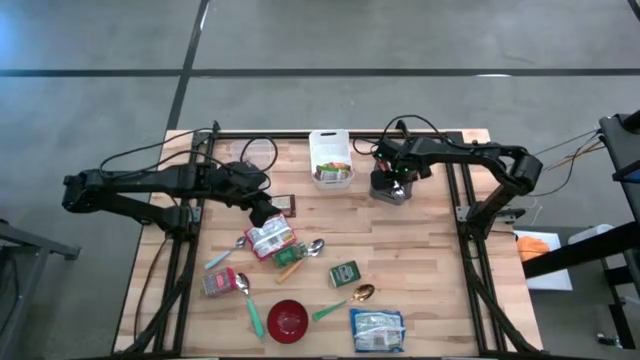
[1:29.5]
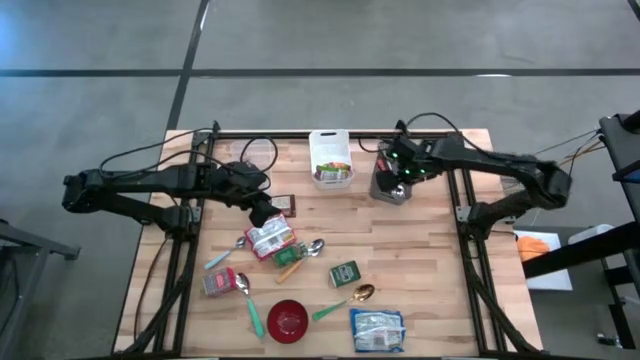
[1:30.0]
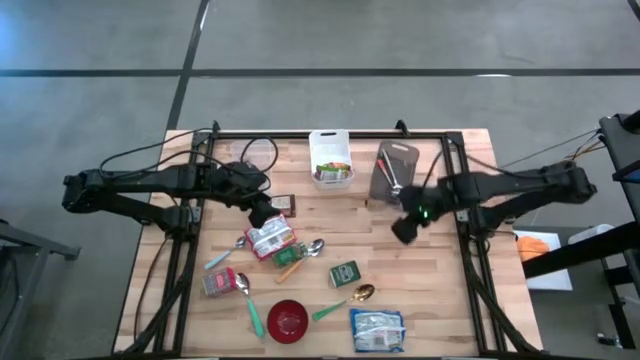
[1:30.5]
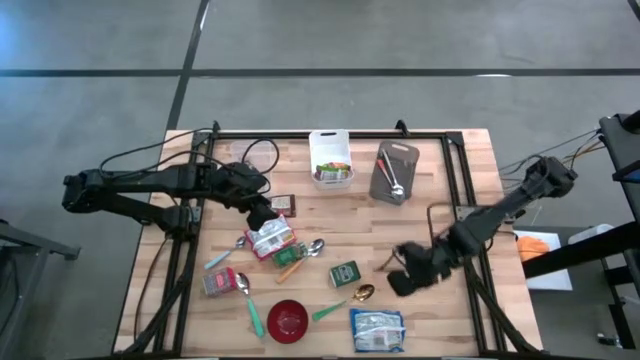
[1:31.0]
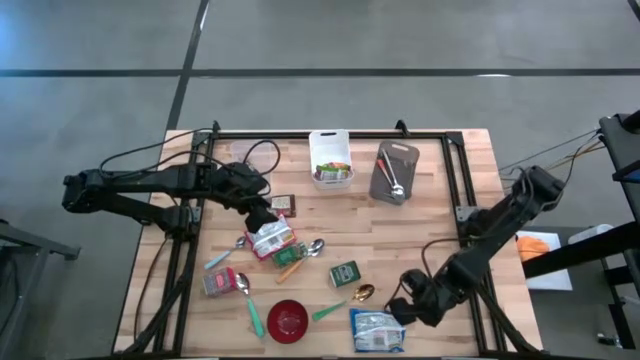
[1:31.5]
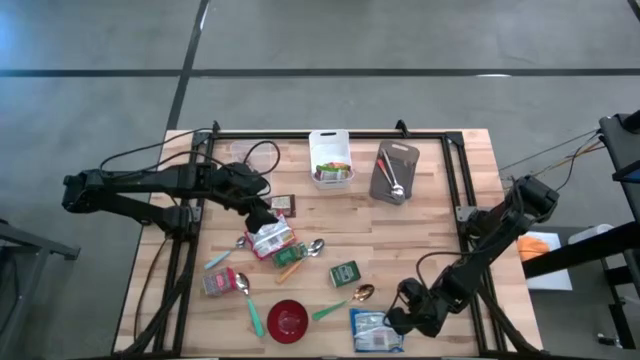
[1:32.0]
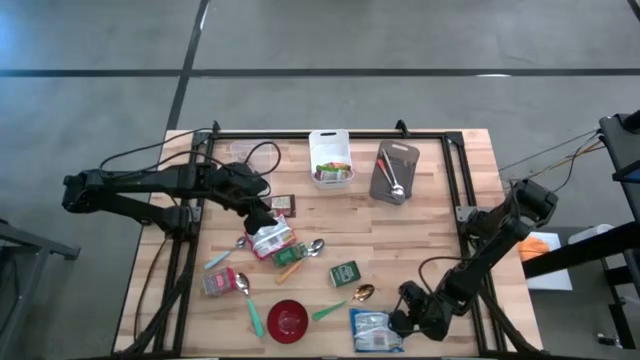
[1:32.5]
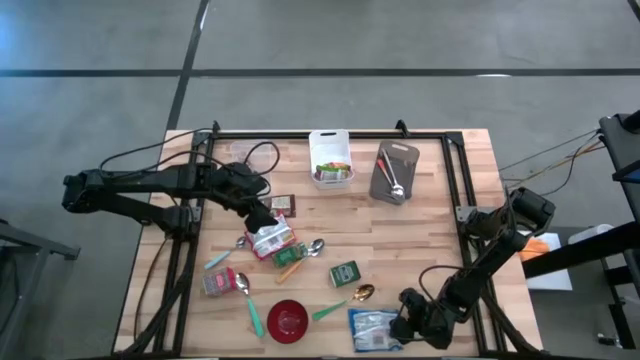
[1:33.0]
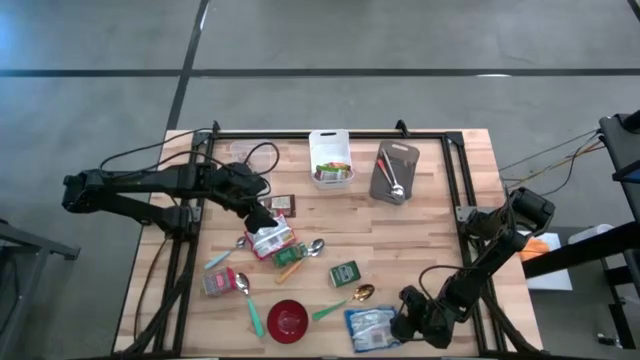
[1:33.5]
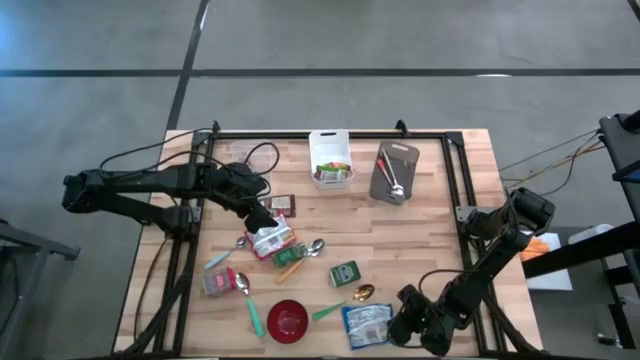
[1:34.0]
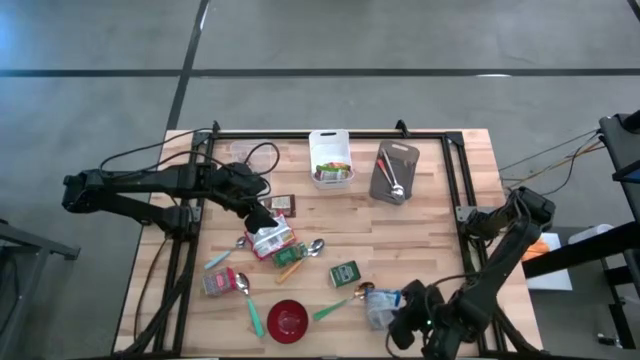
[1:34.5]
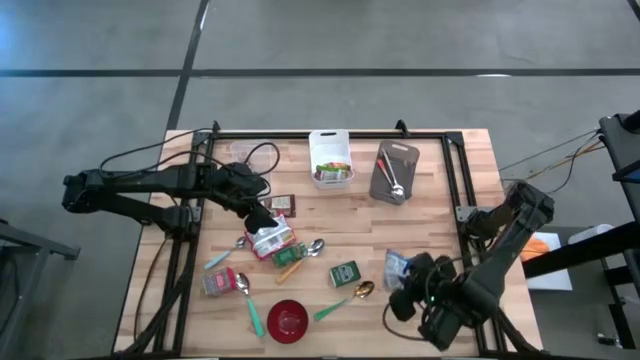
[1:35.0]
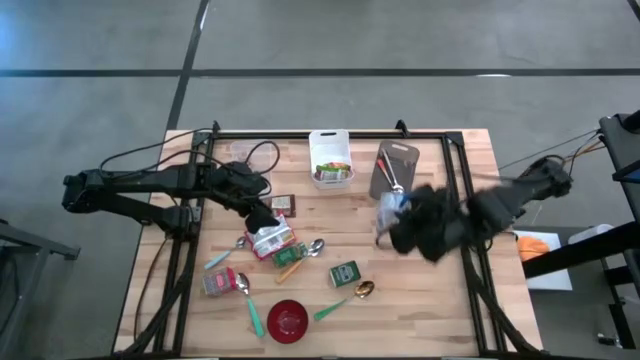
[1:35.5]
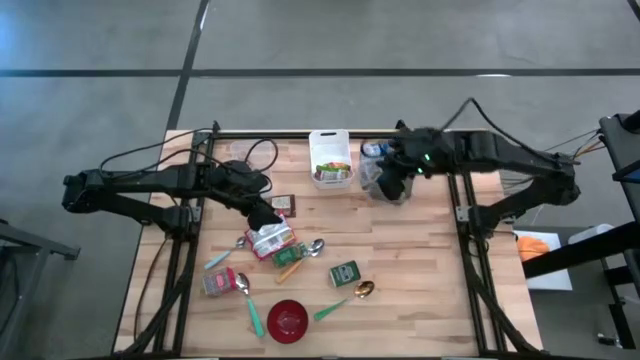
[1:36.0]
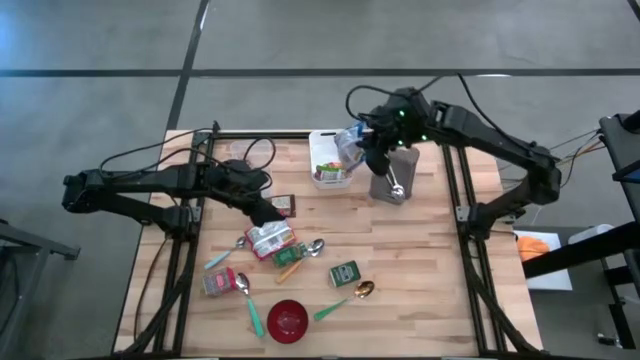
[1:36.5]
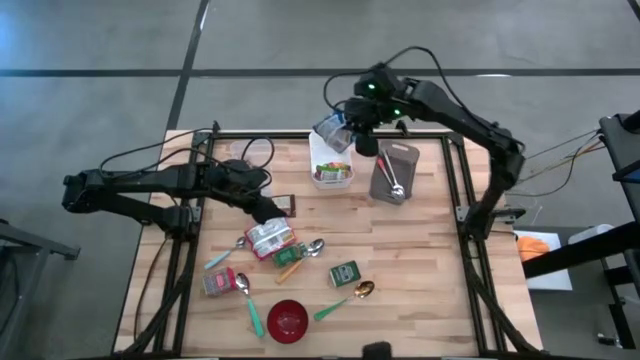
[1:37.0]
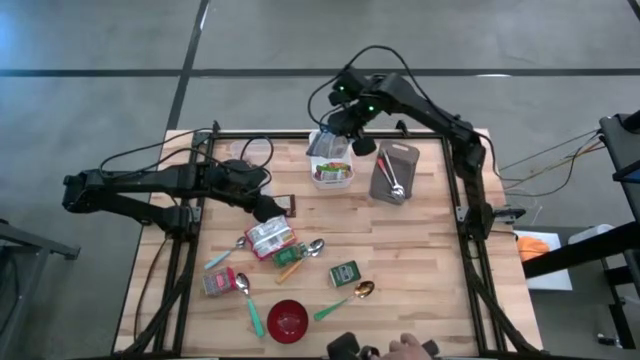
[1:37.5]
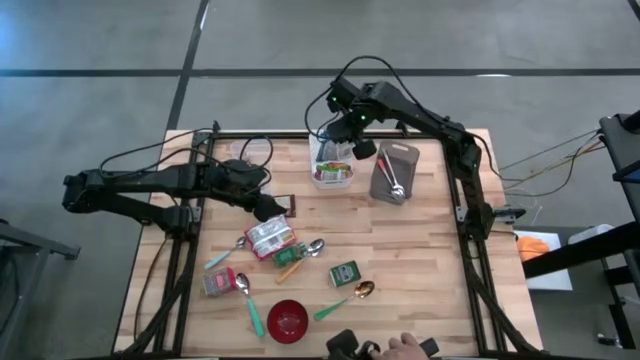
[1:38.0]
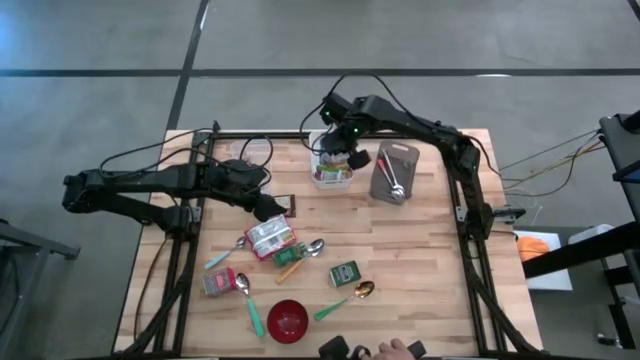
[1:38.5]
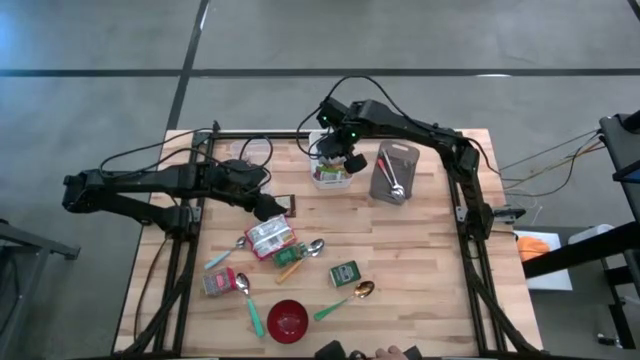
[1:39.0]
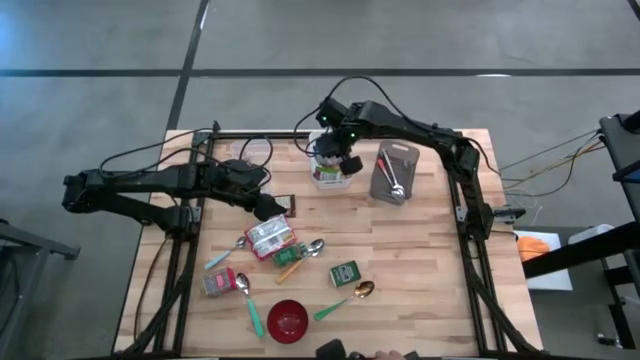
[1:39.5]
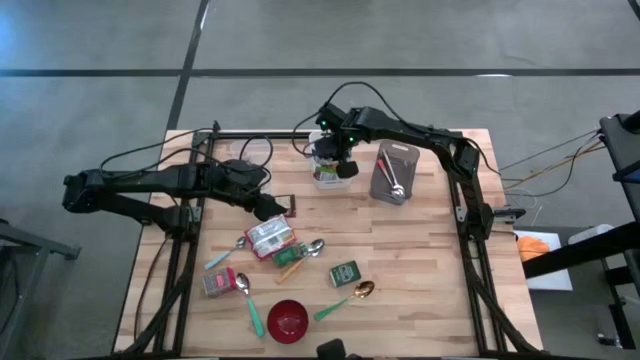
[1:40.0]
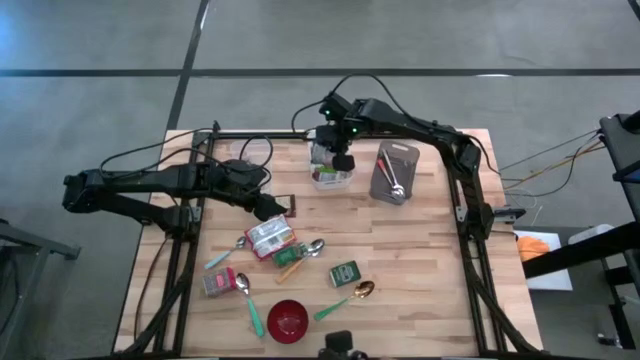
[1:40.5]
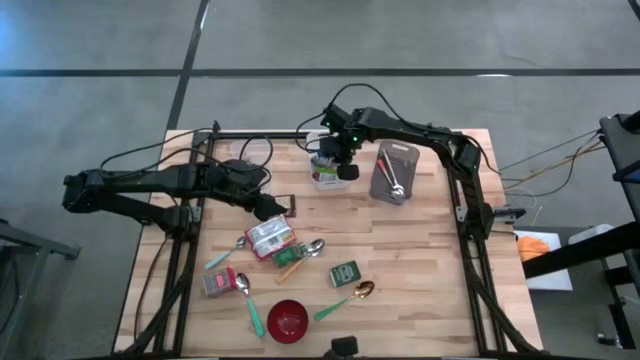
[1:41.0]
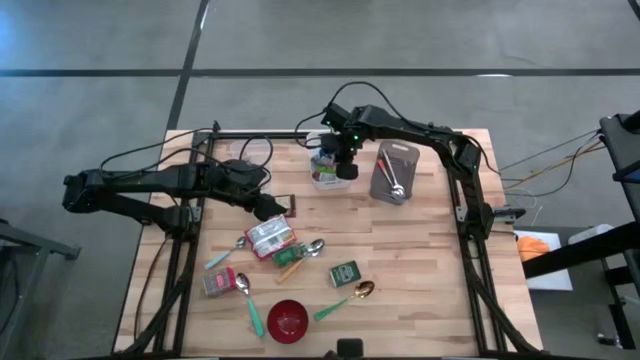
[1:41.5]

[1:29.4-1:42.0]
Put the blue noodle pack into the white bin

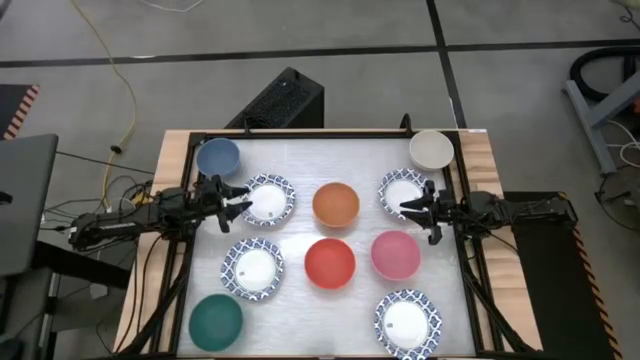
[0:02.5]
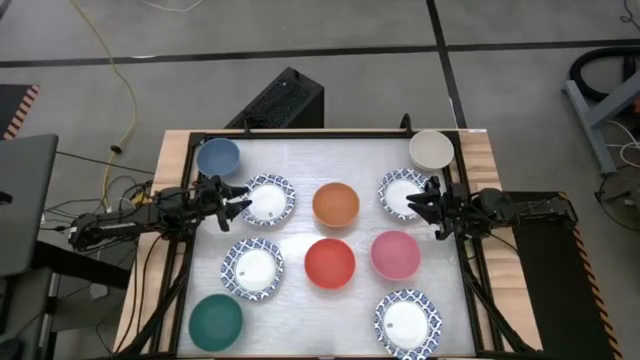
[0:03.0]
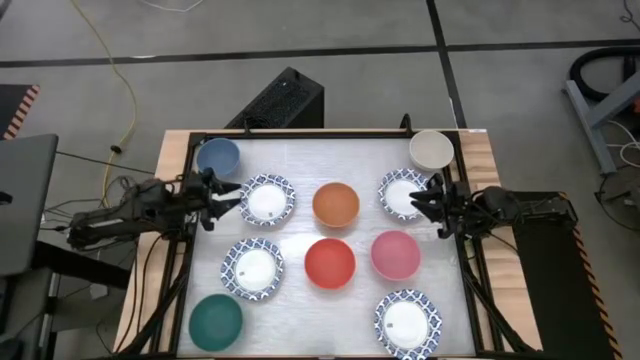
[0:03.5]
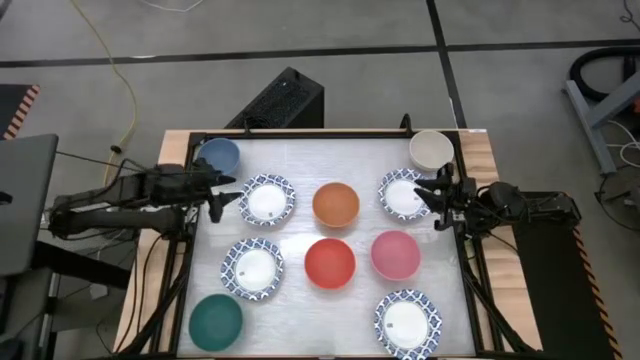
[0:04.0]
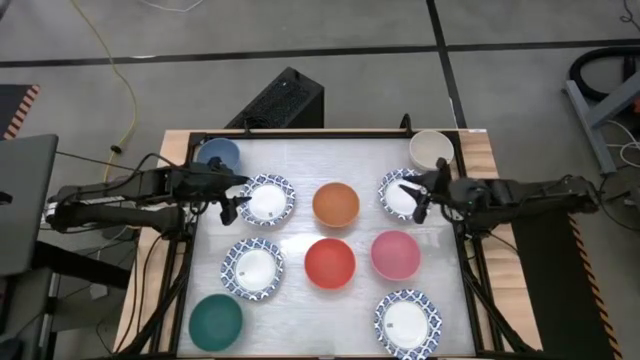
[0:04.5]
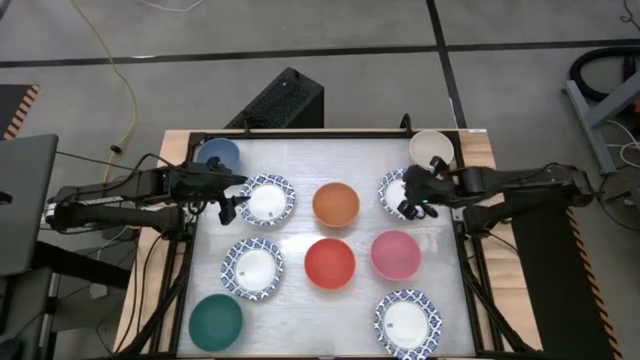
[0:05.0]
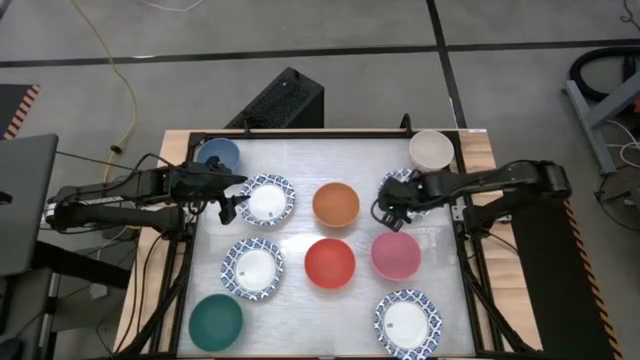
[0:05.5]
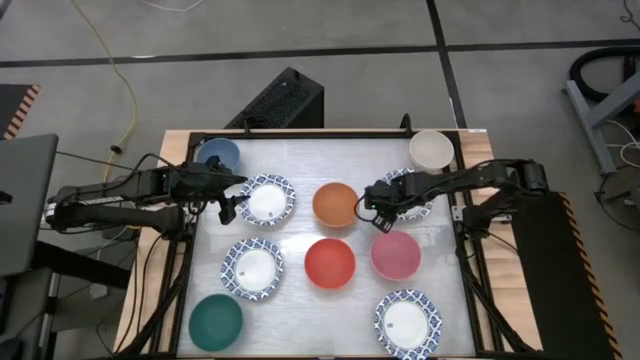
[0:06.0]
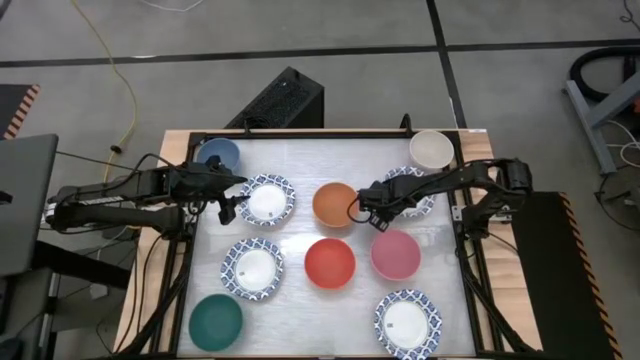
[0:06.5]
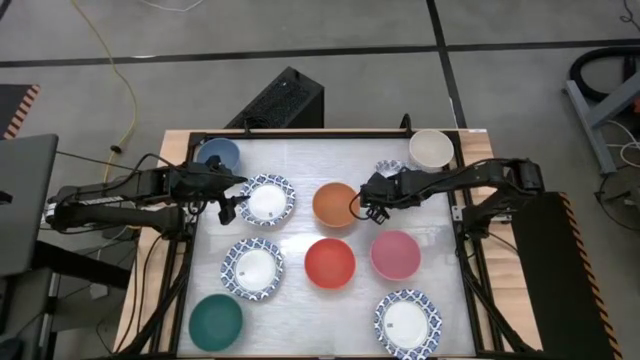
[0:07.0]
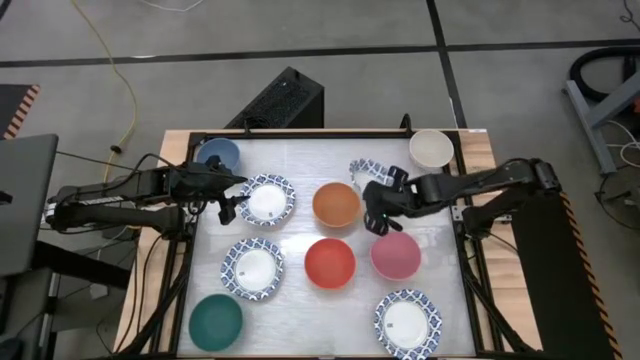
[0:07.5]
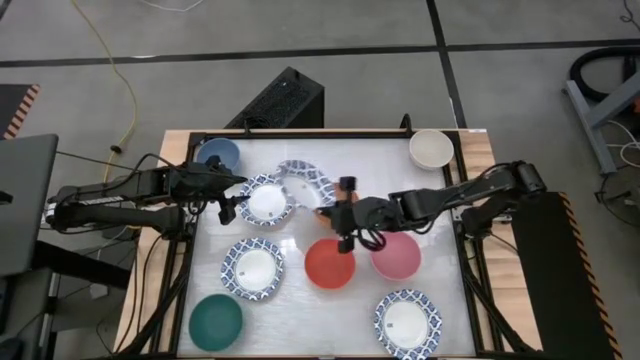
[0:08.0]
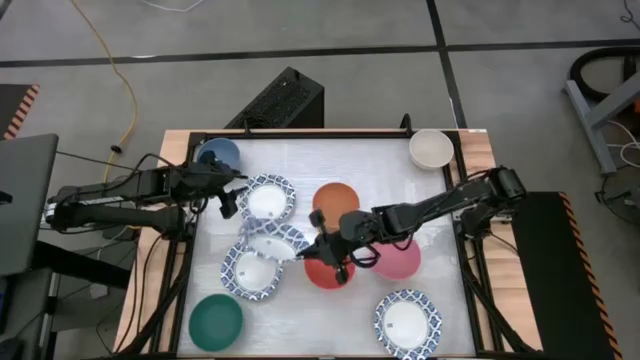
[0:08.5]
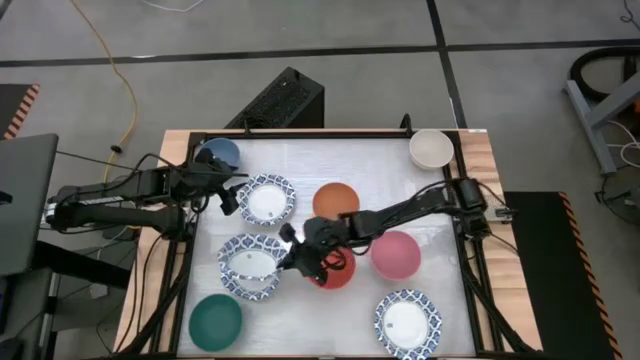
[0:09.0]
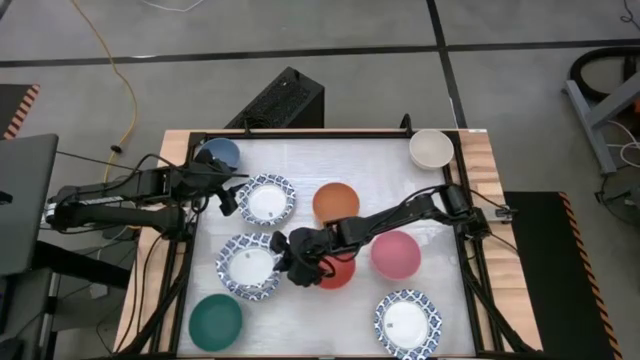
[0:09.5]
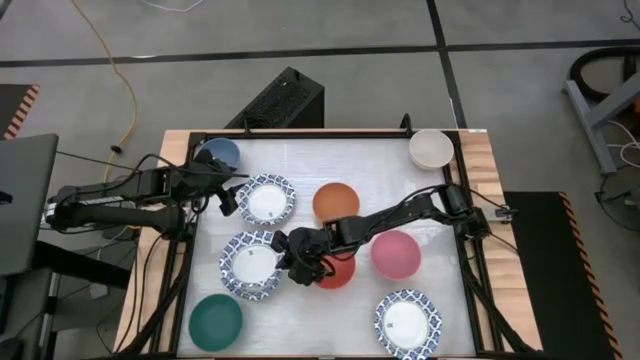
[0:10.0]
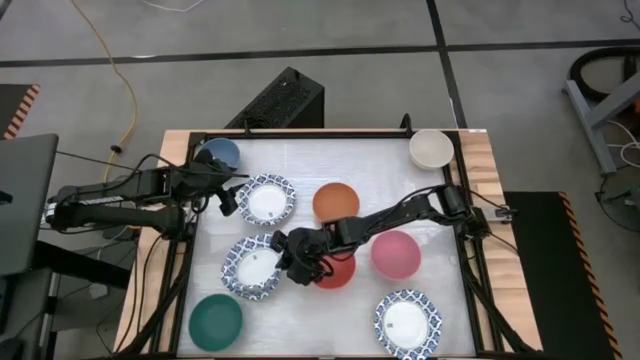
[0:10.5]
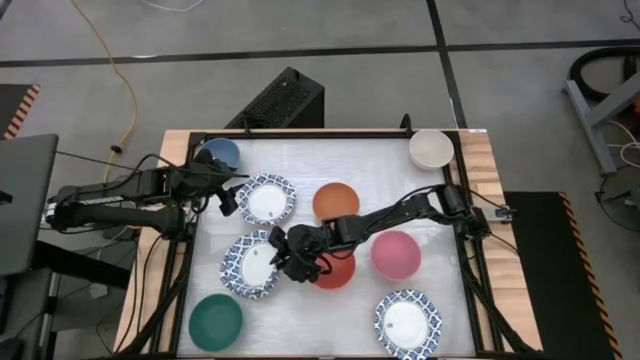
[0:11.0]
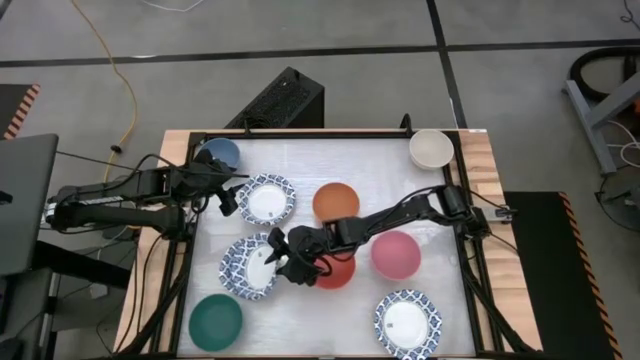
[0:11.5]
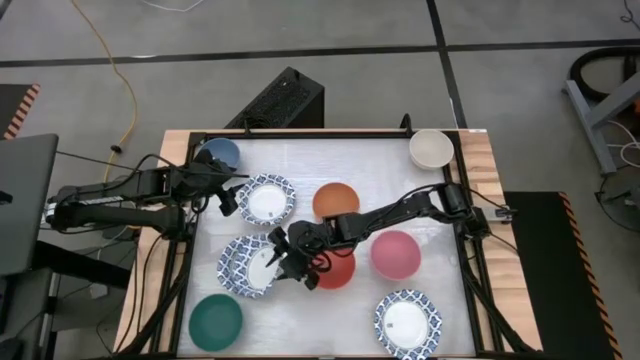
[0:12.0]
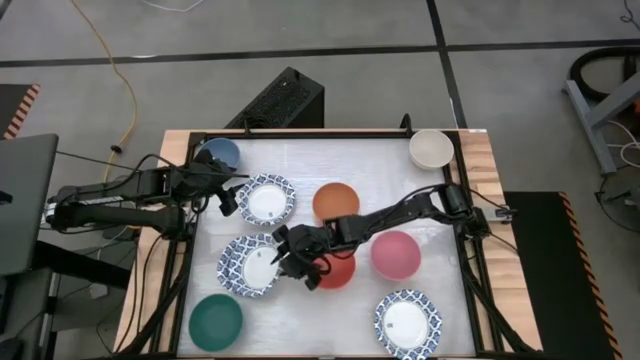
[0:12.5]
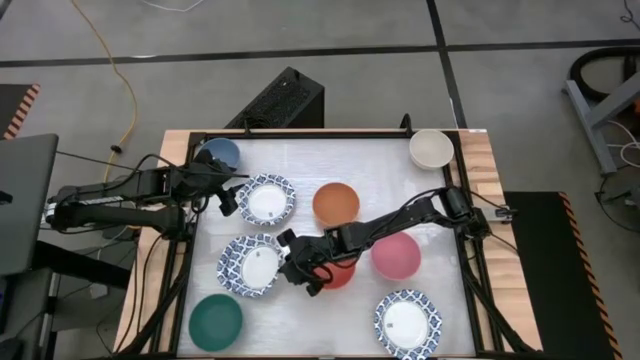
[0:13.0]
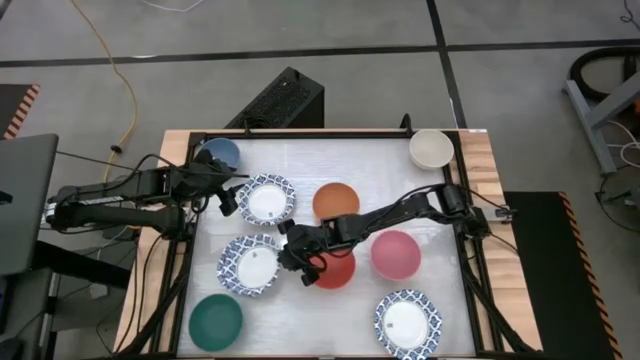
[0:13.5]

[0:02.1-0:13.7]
Stack the top right white patterned bowl on top of the other middle white patterned bowl
